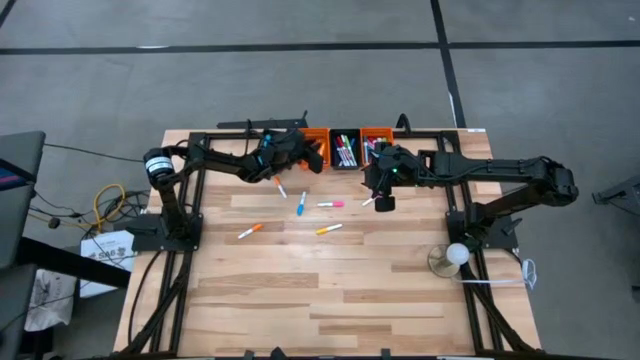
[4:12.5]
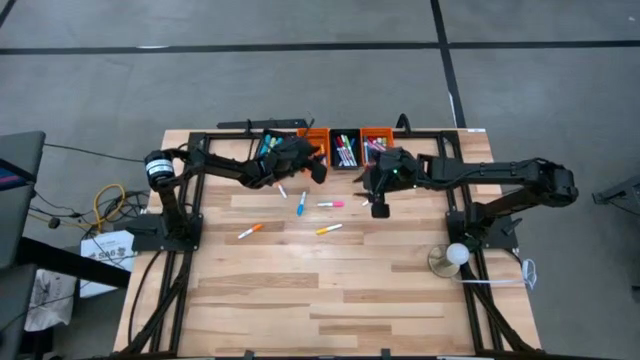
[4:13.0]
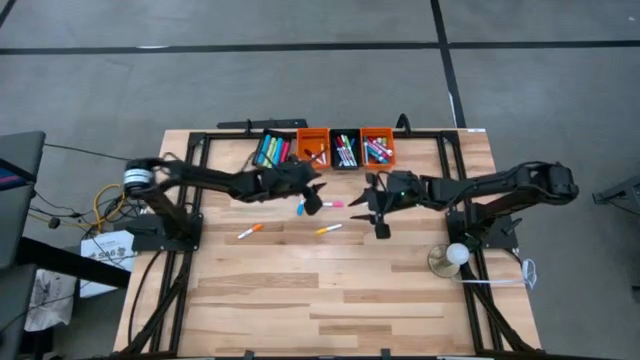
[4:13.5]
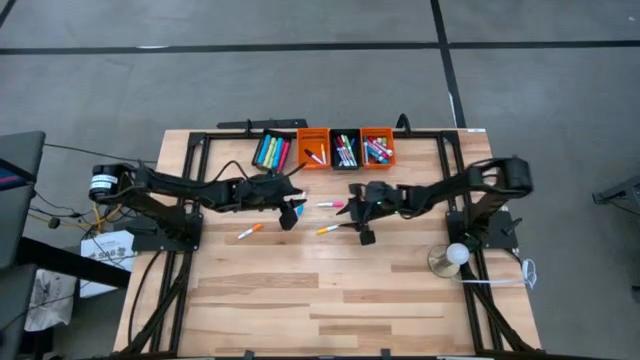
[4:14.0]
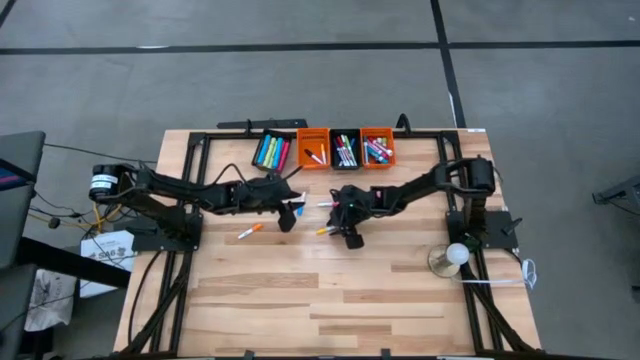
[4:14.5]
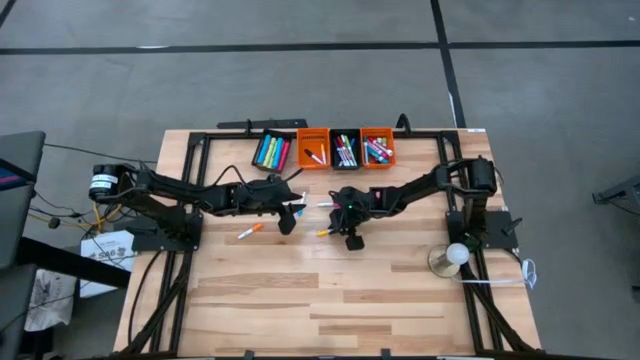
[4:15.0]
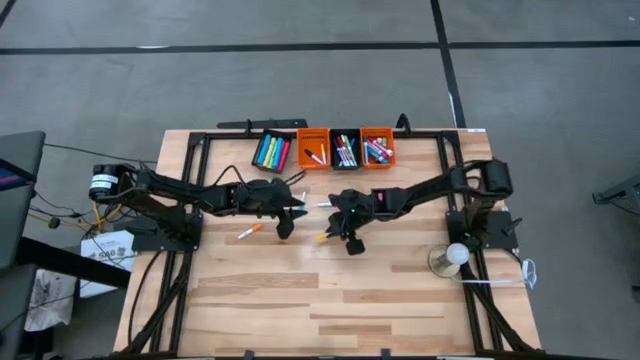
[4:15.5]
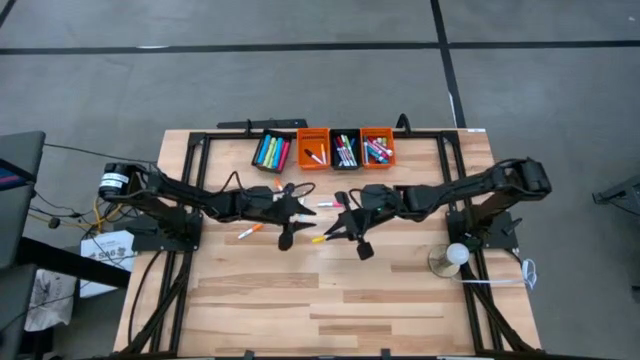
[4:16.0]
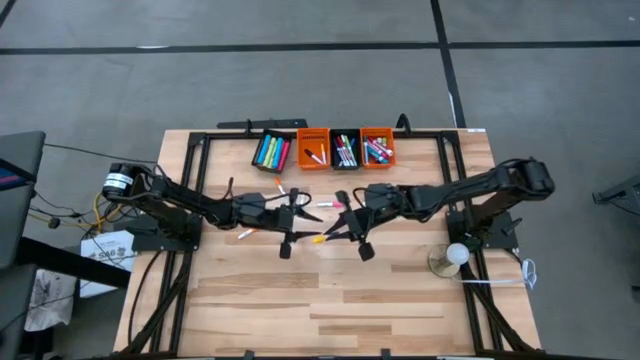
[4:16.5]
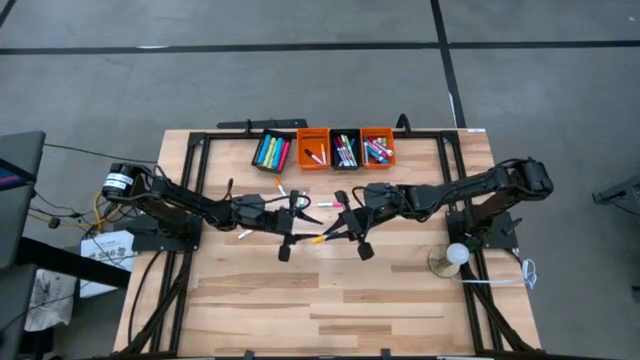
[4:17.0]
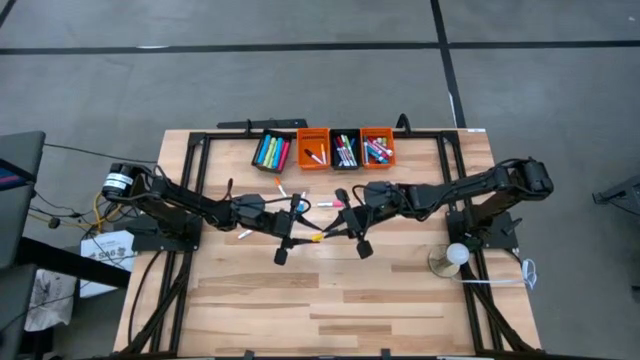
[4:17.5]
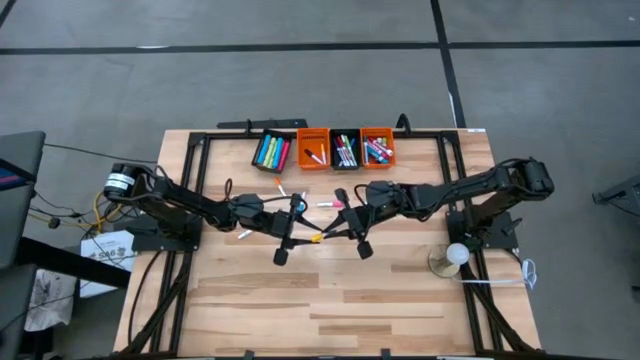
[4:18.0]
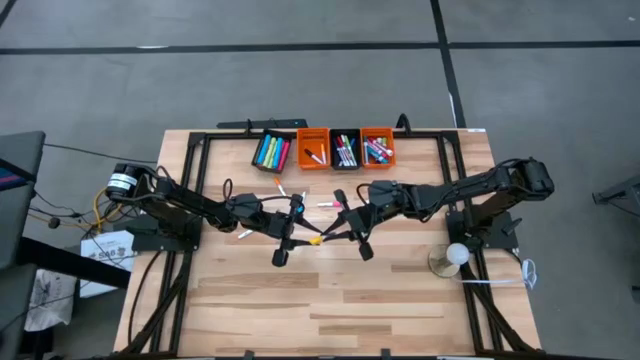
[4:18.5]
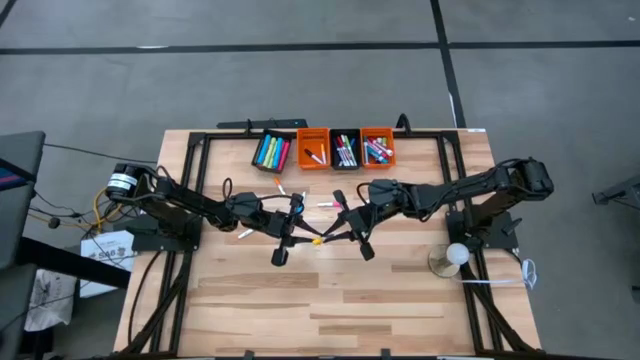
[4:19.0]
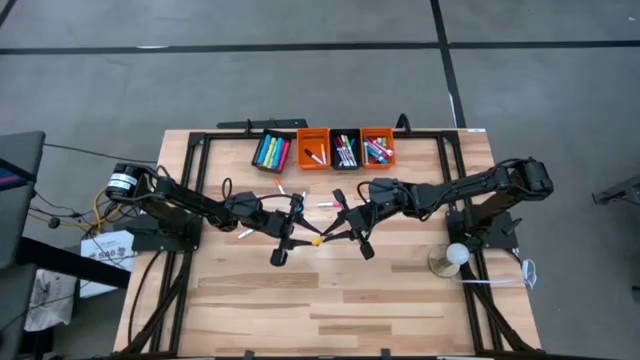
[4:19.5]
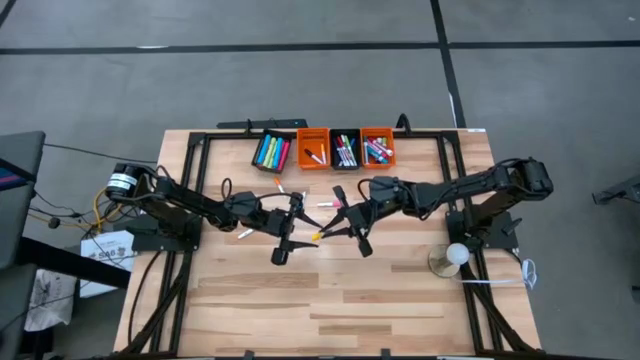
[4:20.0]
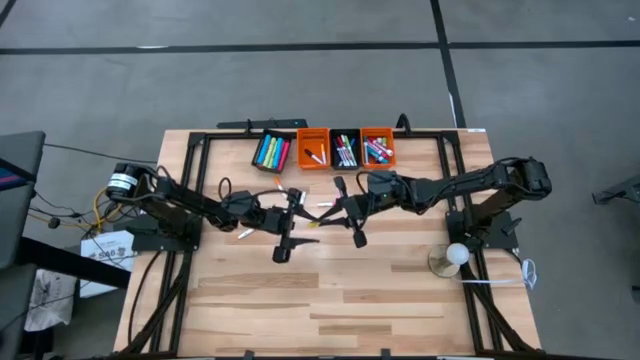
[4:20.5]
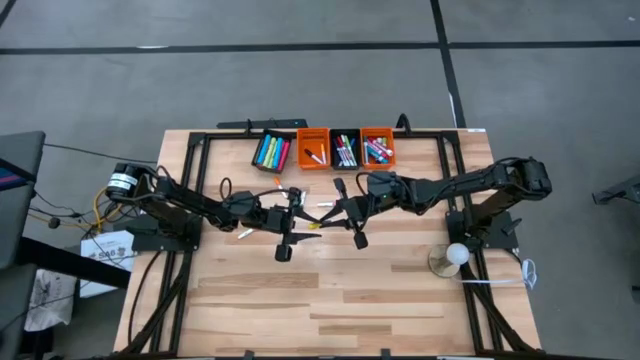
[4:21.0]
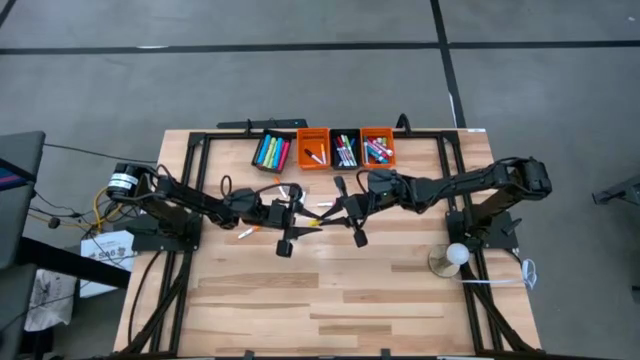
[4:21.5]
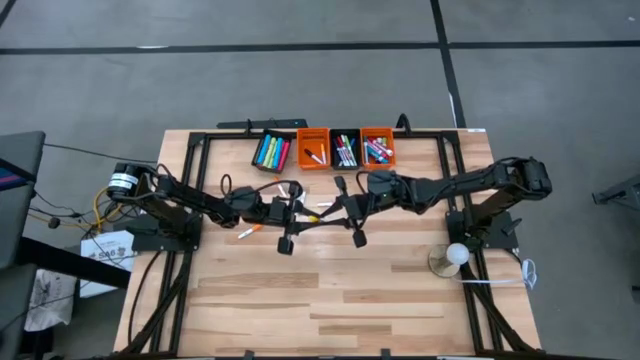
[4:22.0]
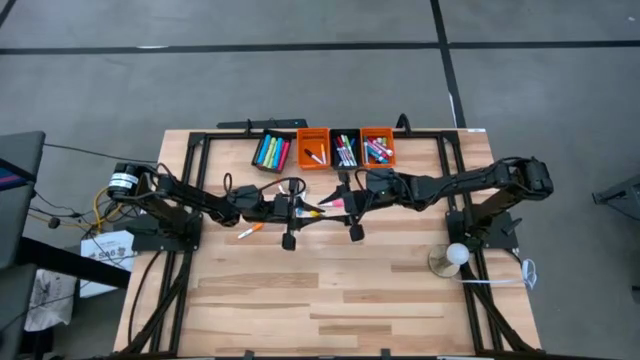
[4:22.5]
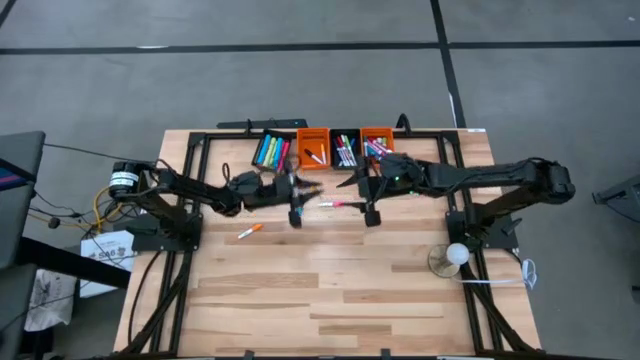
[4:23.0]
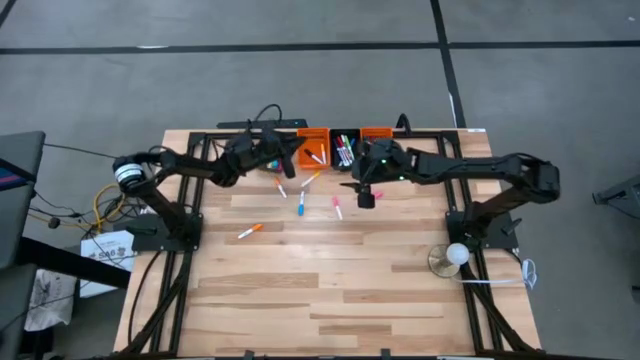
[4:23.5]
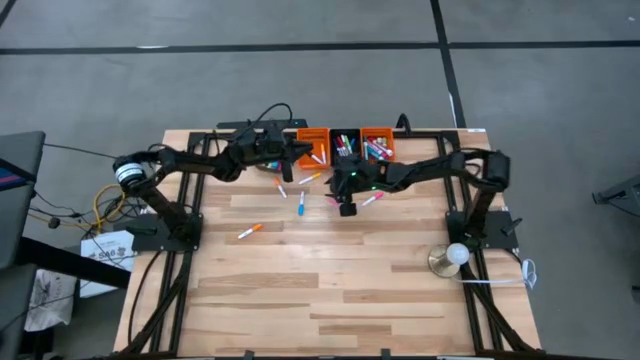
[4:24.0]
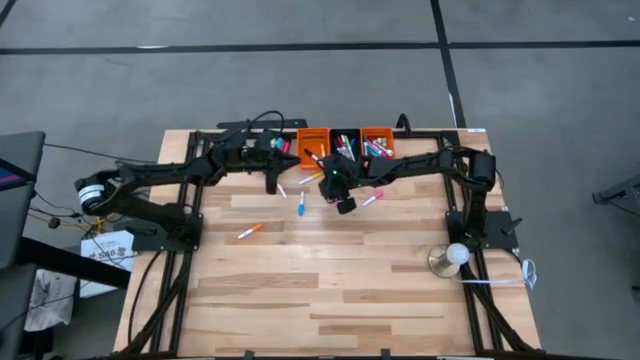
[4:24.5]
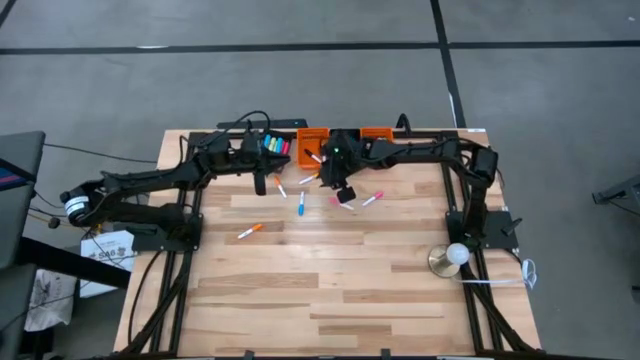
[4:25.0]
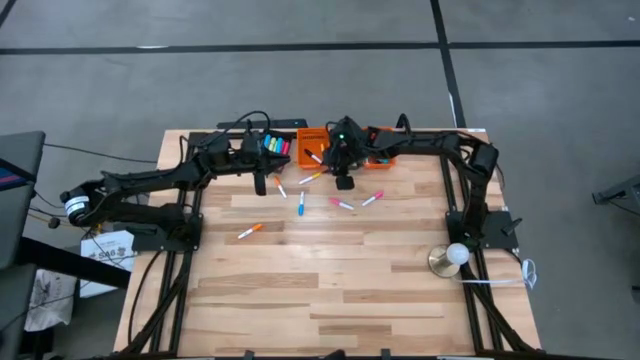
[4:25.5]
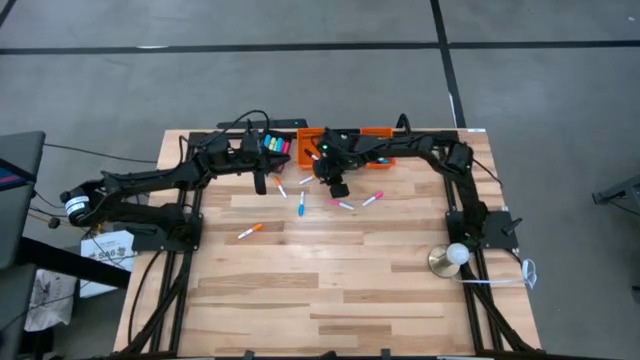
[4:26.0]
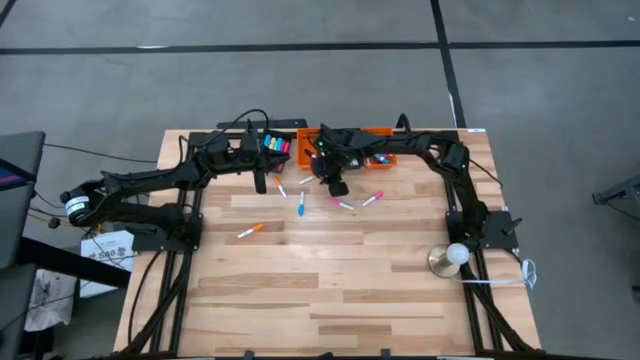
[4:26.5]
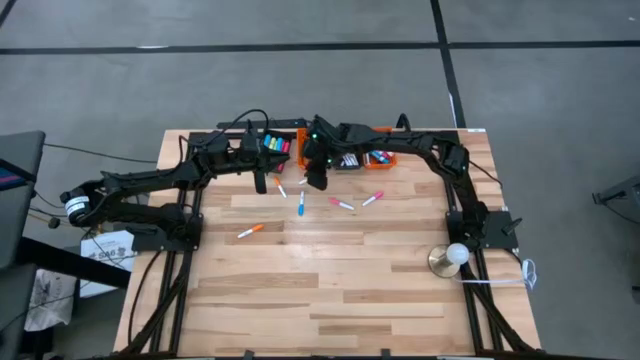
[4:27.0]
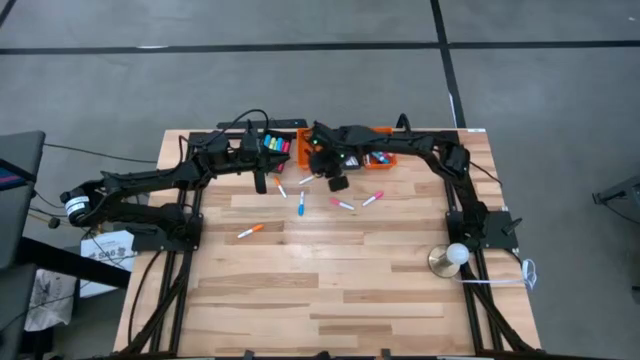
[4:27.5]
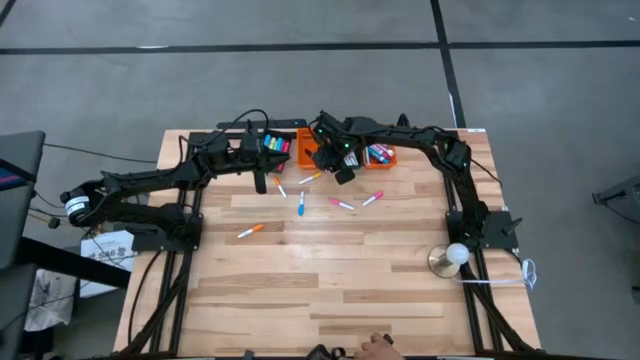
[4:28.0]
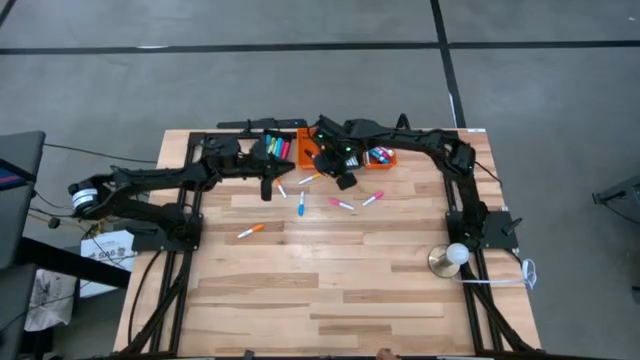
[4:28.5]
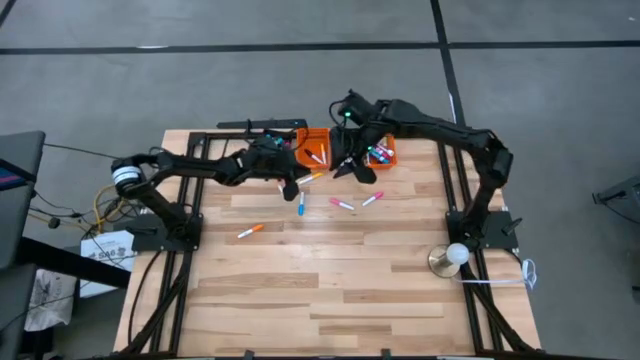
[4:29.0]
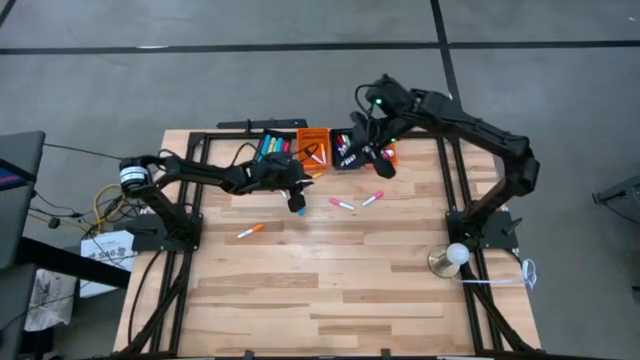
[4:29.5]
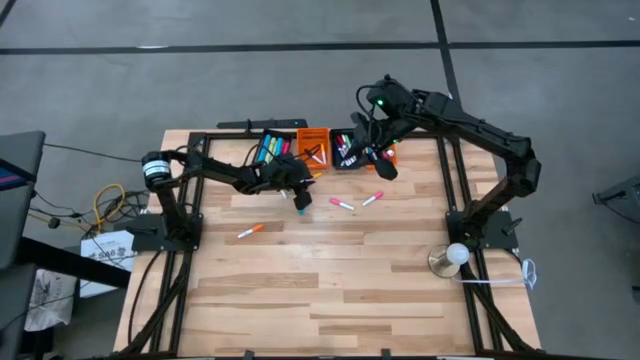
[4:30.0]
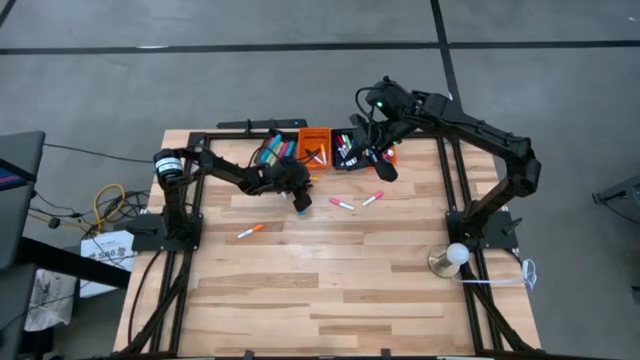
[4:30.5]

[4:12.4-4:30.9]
Task: Pick & Place Markers
Put the small yellow highlighter pen into the left orange basket

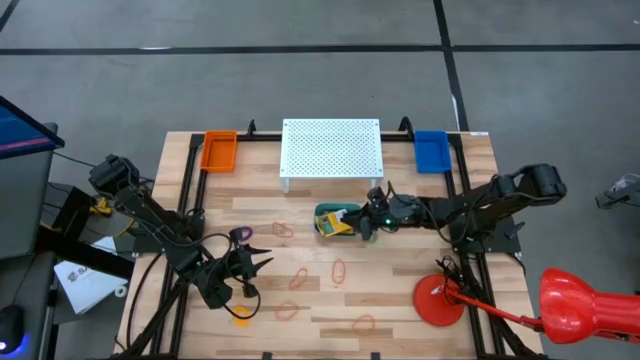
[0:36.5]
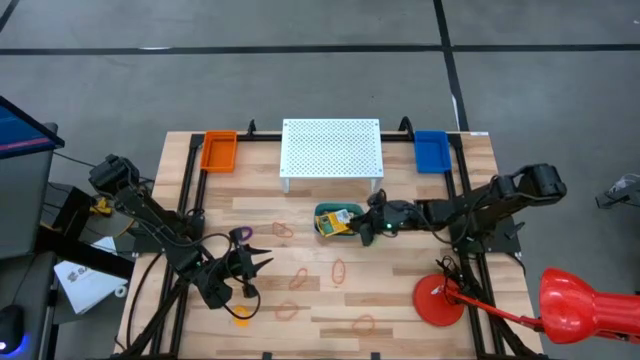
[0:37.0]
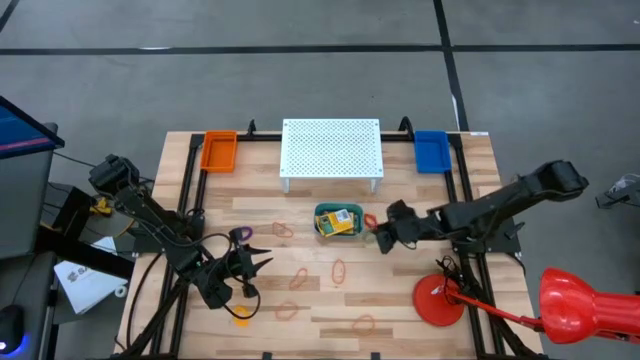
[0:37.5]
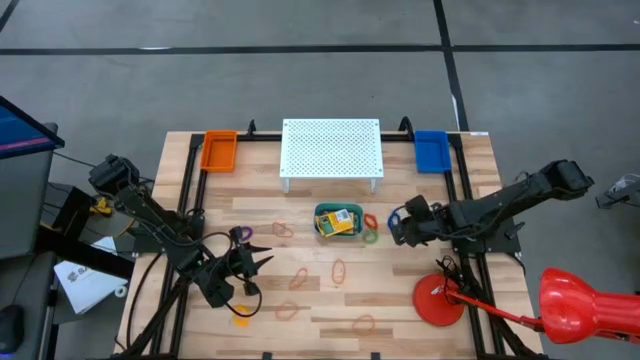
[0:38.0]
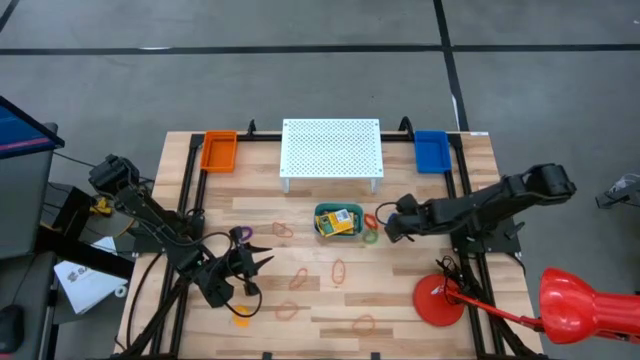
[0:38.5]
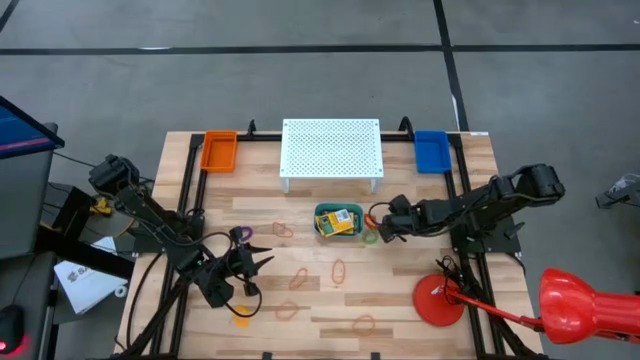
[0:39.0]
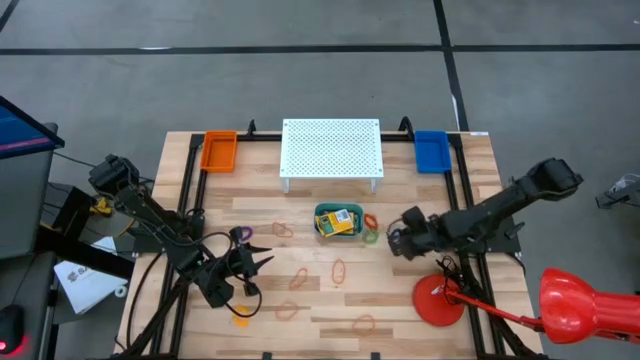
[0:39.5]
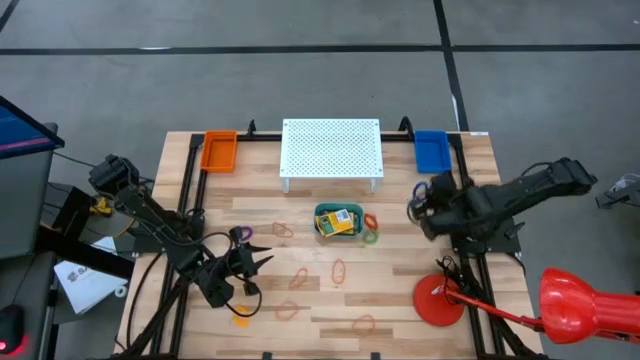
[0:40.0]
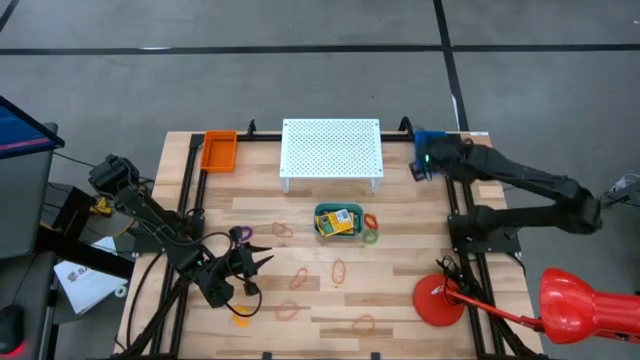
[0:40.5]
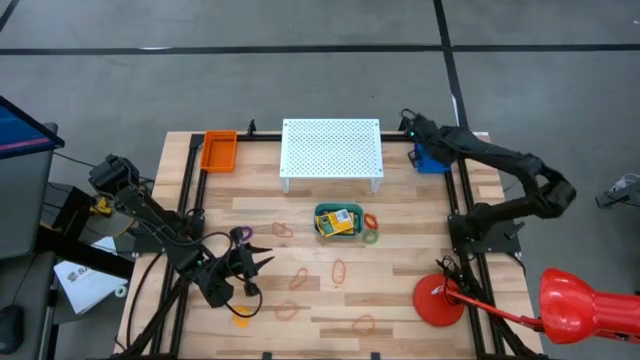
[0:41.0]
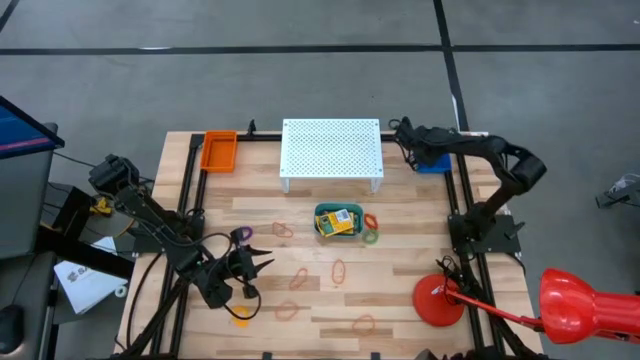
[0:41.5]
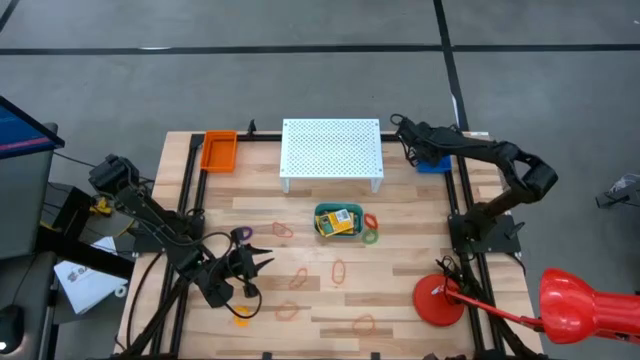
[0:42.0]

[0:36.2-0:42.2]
Task: Pick & Place Office Desk Supplies
Put the blue keychain into the blue bin
